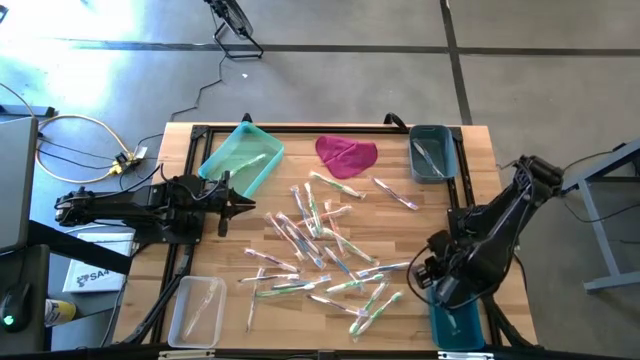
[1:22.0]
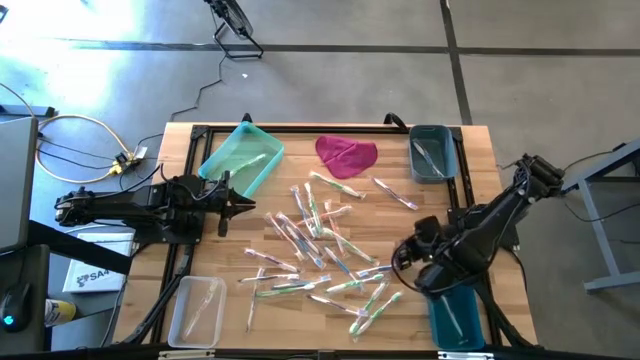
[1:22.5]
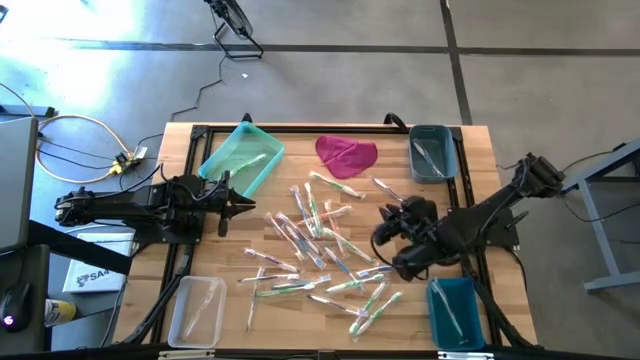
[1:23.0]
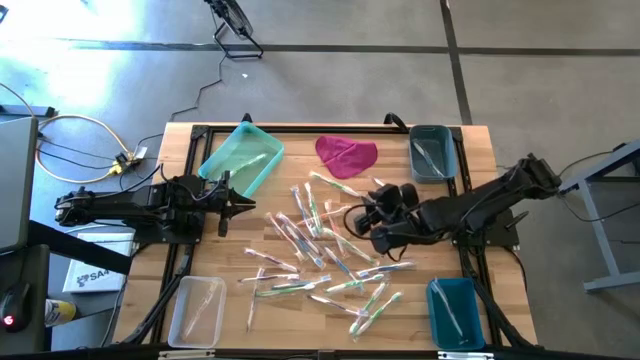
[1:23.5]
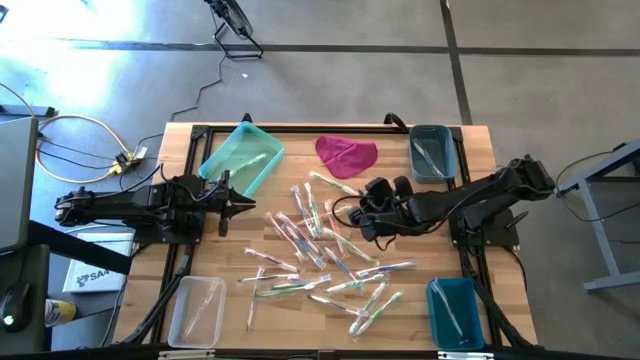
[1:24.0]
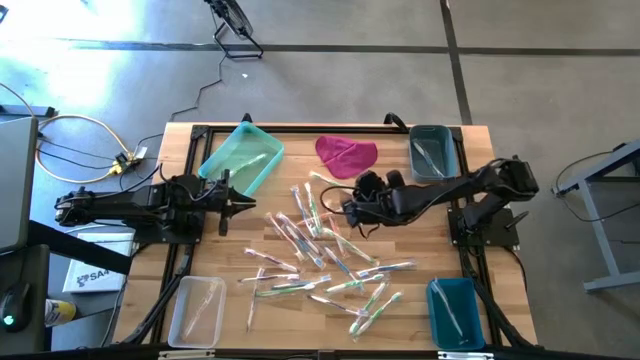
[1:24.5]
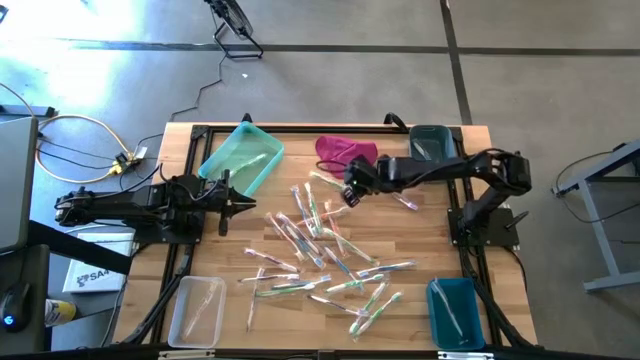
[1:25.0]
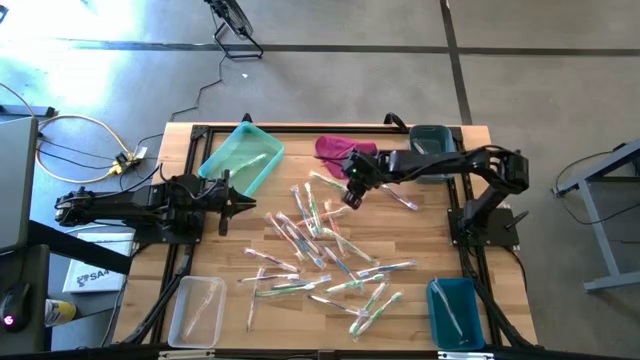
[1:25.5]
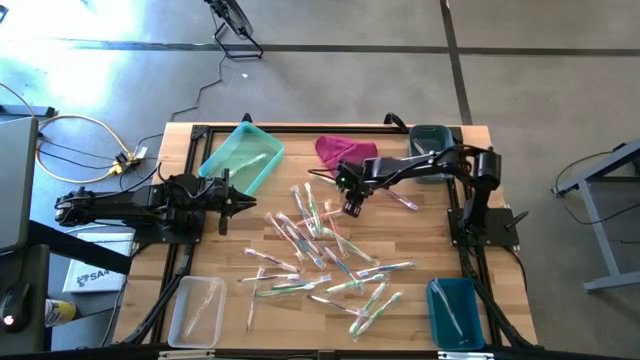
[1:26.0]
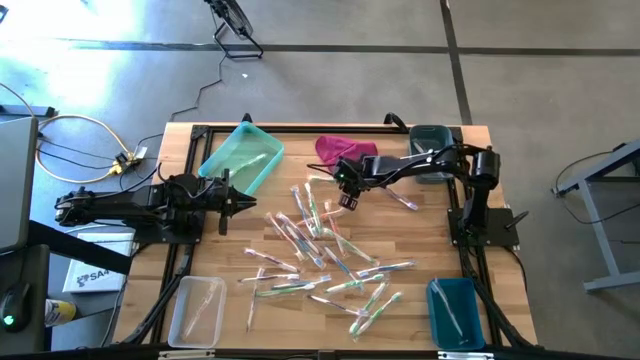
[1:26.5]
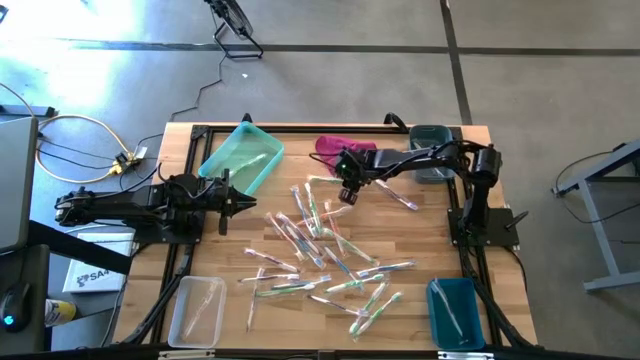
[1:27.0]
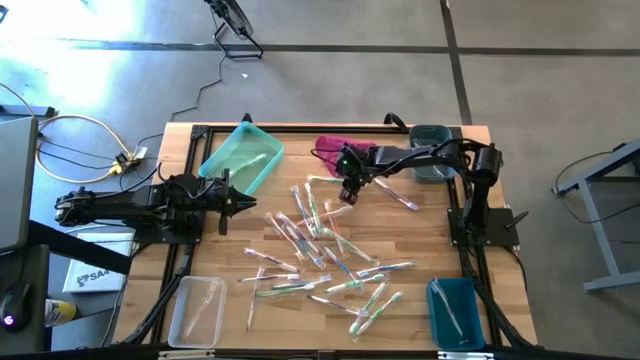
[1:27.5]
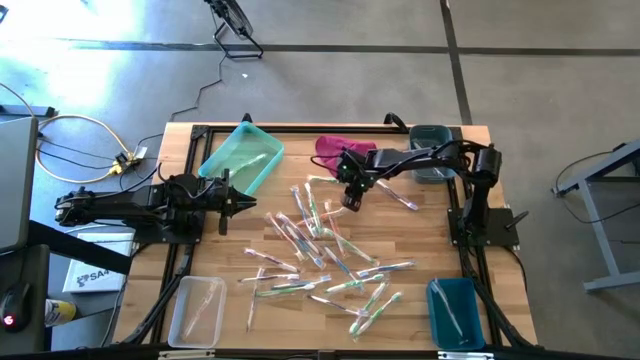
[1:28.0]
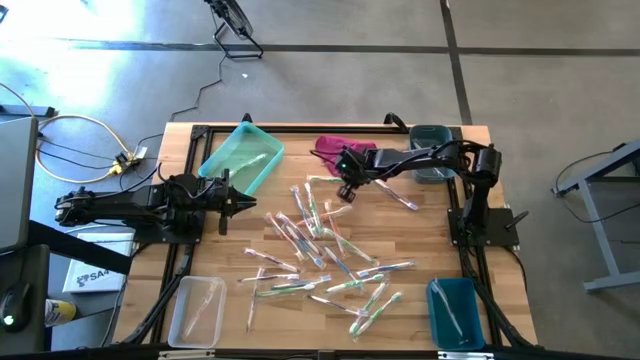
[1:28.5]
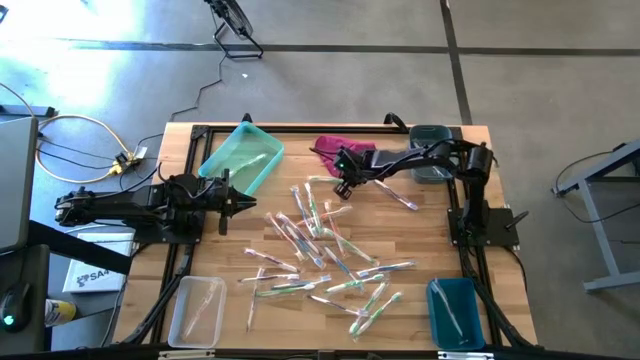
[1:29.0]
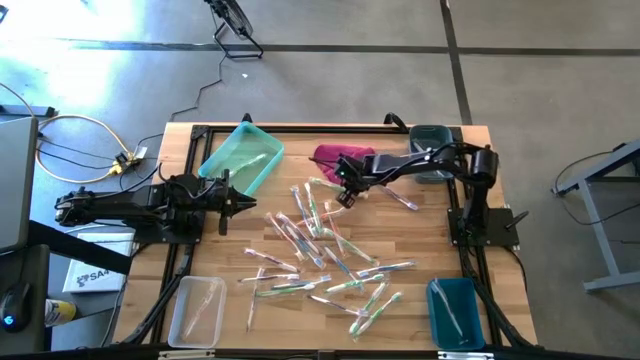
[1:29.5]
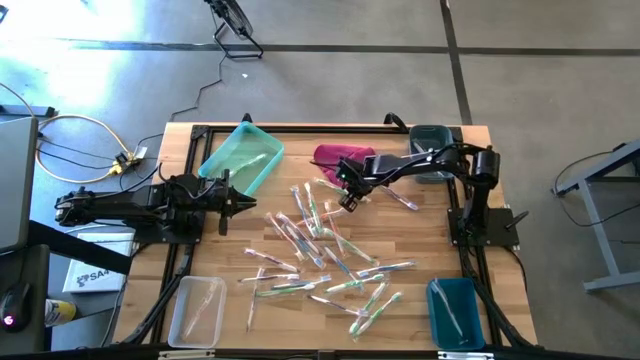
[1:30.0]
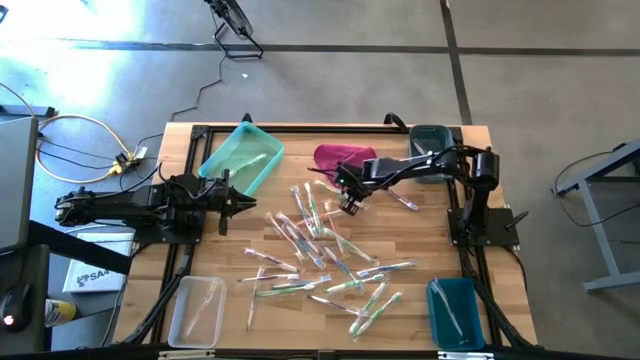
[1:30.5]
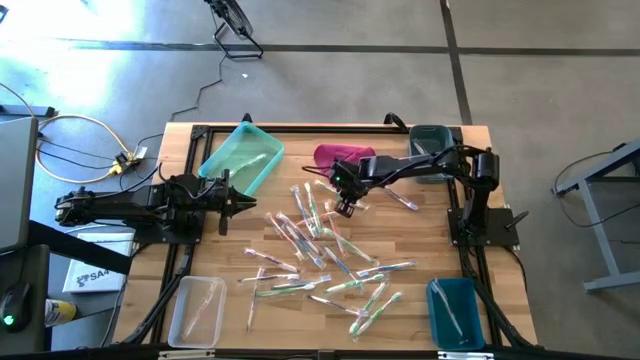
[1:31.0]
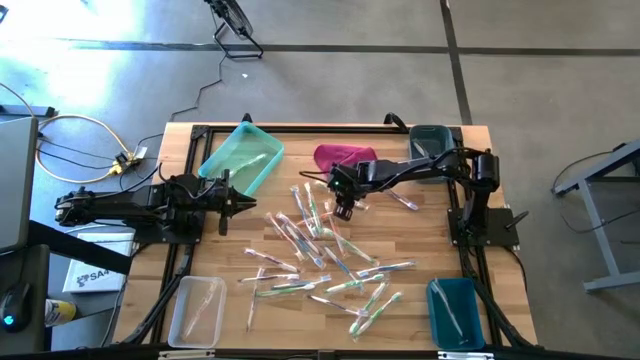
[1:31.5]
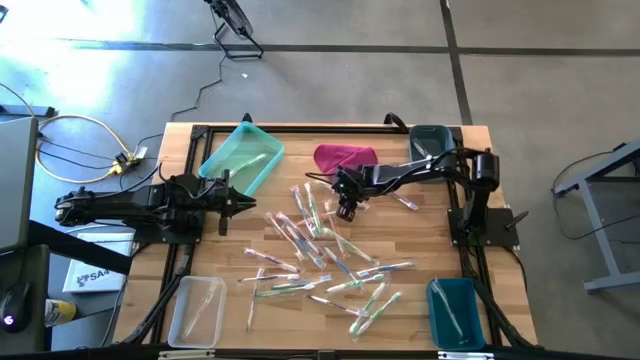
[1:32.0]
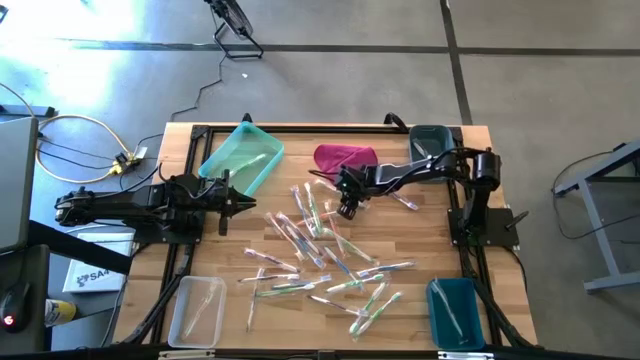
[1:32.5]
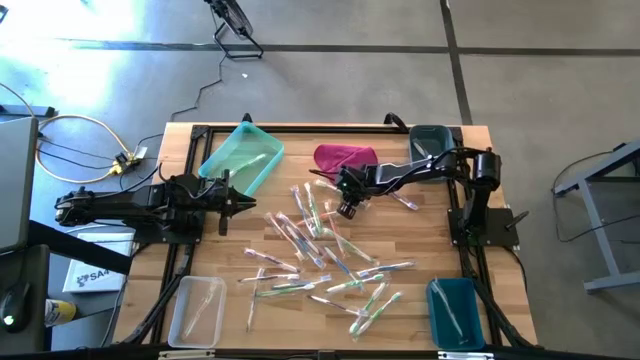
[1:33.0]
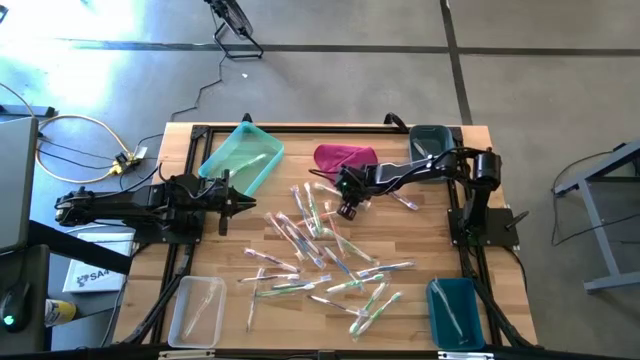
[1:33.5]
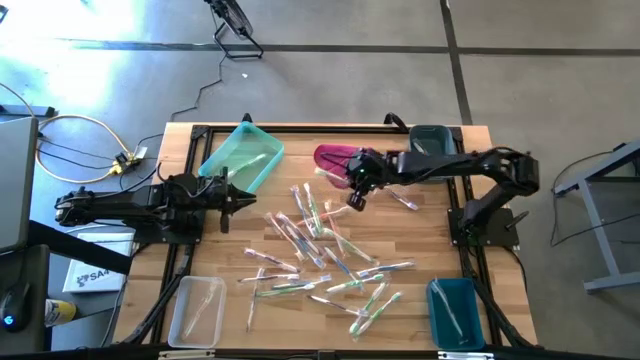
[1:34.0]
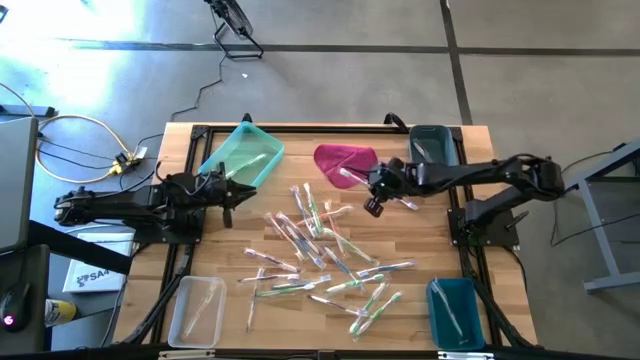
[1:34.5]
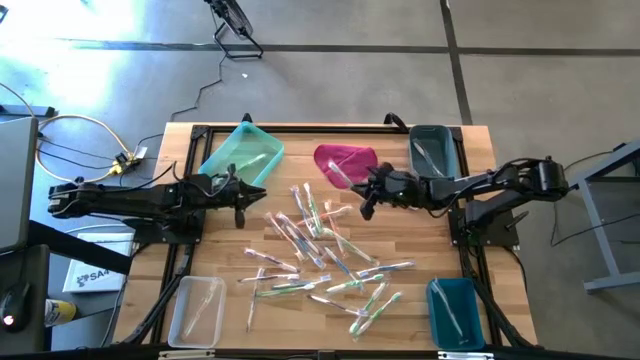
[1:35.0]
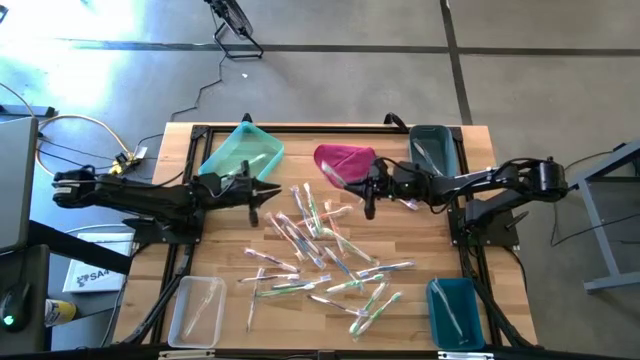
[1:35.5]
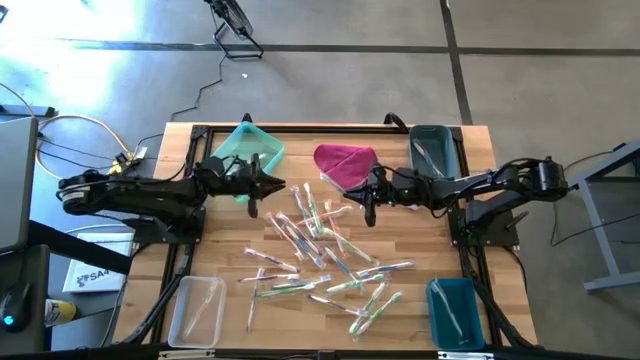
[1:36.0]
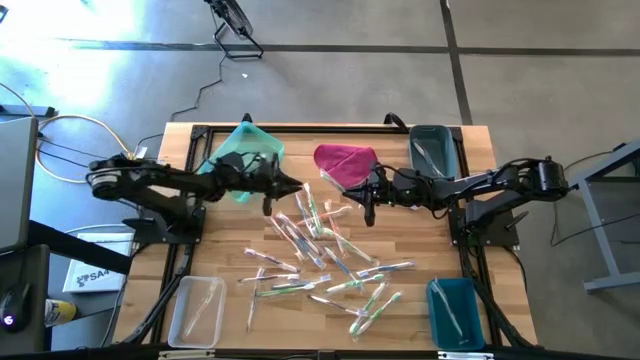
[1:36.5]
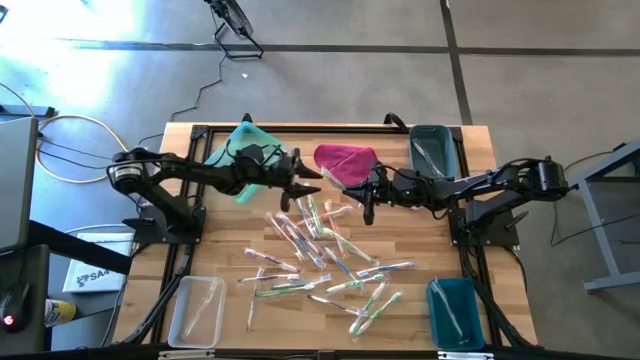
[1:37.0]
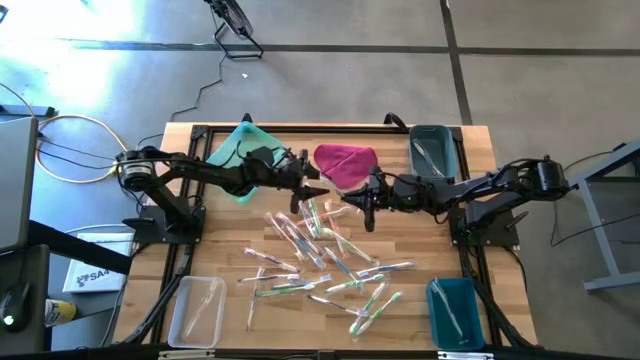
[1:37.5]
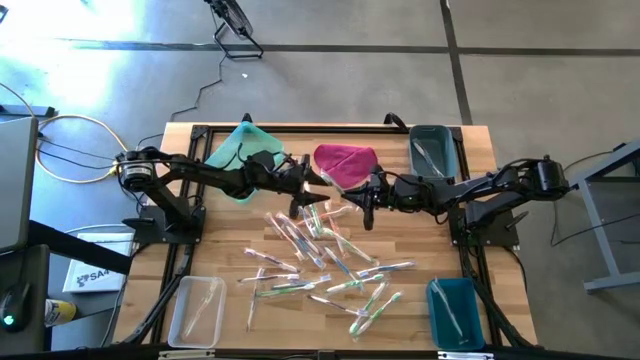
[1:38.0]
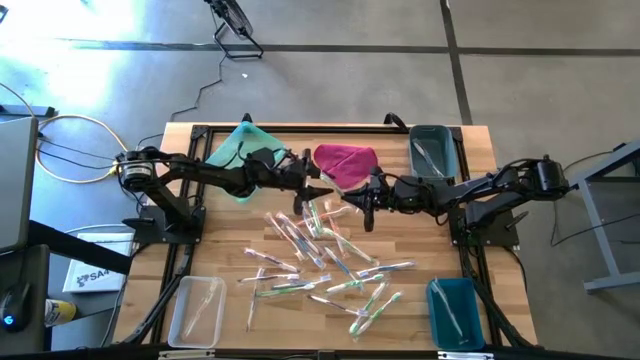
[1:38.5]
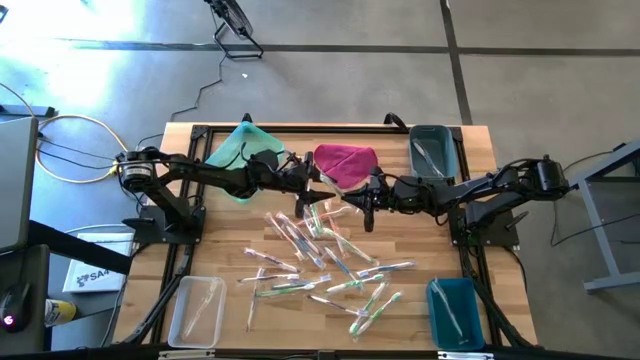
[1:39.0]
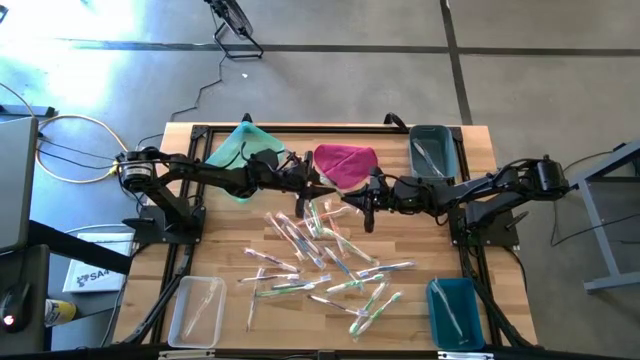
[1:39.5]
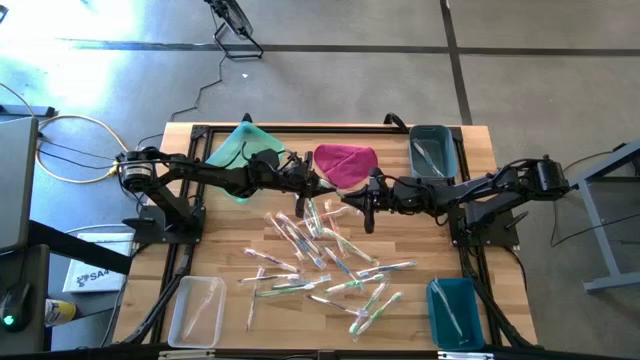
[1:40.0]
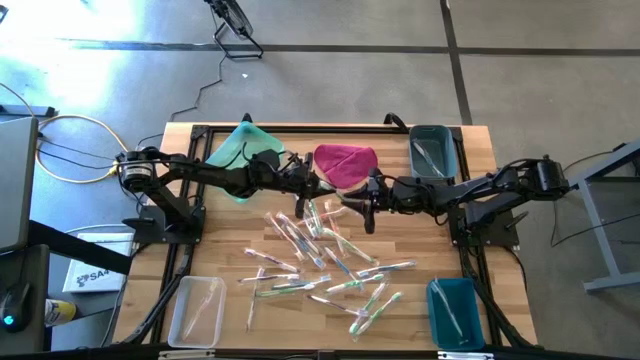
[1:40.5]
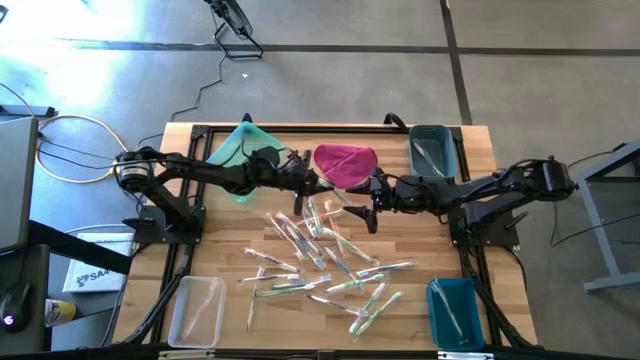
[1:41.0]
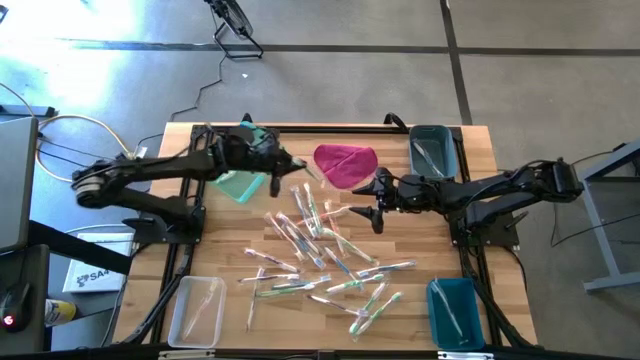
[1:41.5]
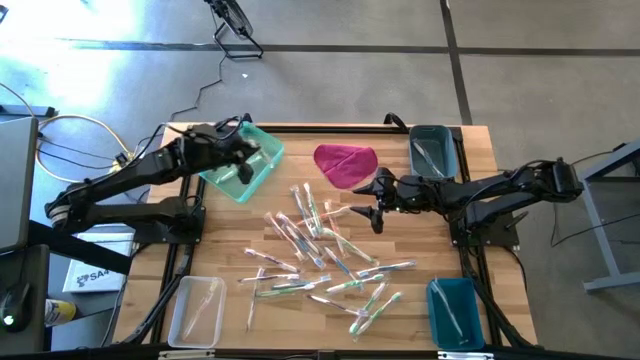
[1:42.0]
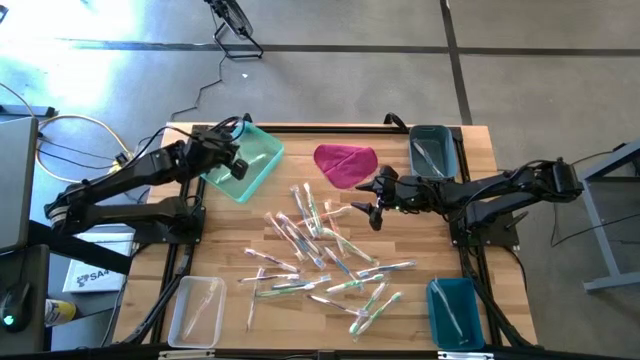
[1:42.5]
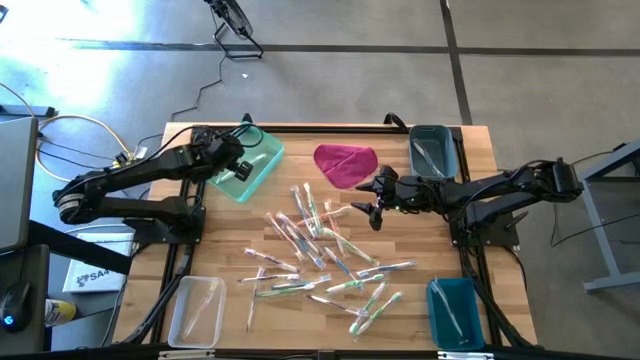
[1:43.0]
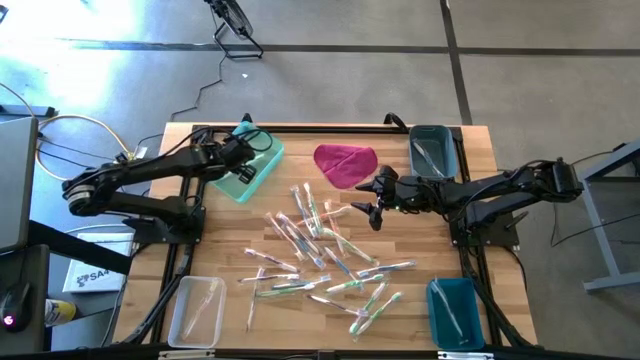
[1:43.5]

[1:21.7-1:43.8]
Task: Pick & Place Toothbrushes
Put the green toothbrush to the green bin
